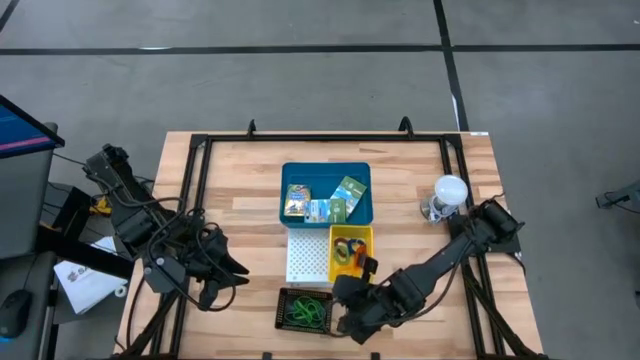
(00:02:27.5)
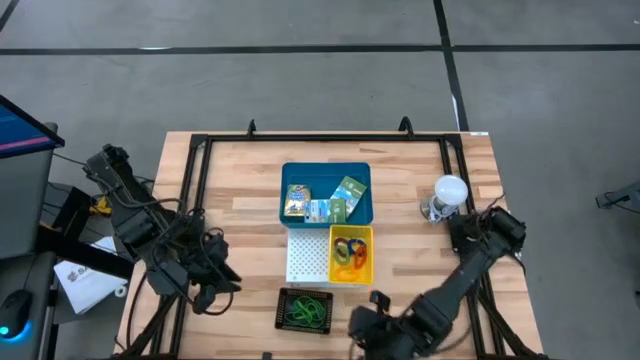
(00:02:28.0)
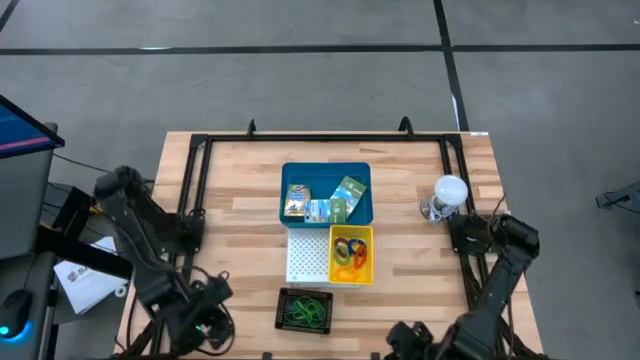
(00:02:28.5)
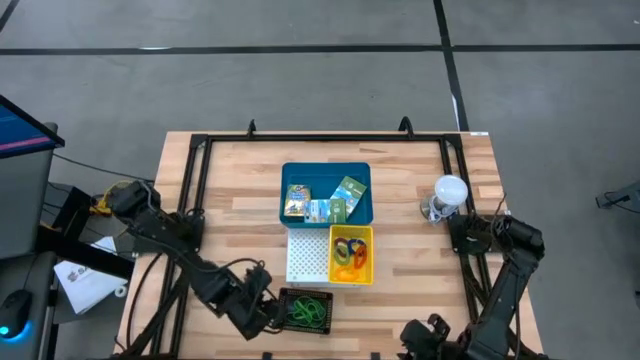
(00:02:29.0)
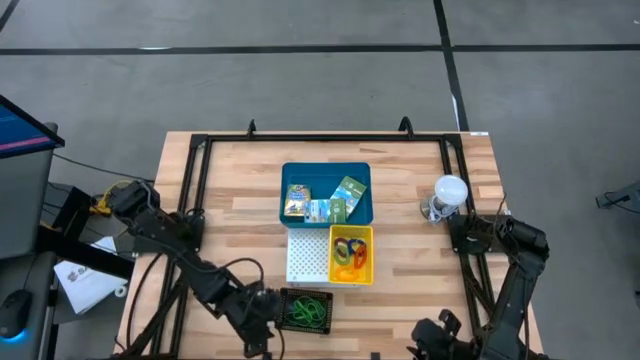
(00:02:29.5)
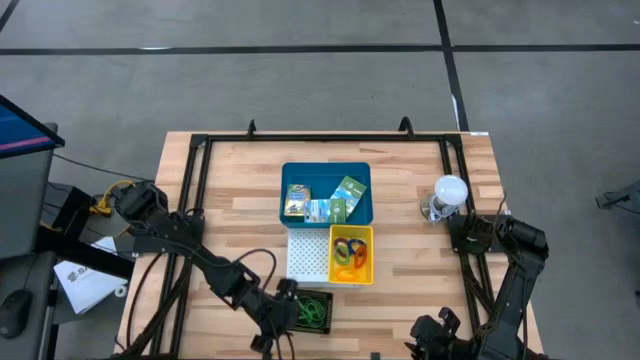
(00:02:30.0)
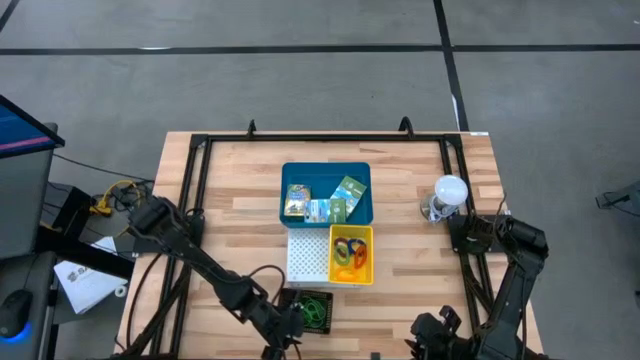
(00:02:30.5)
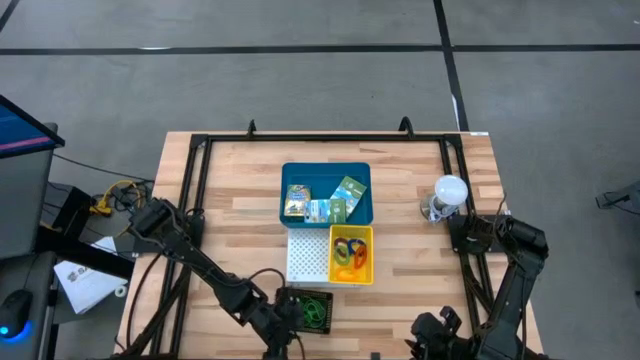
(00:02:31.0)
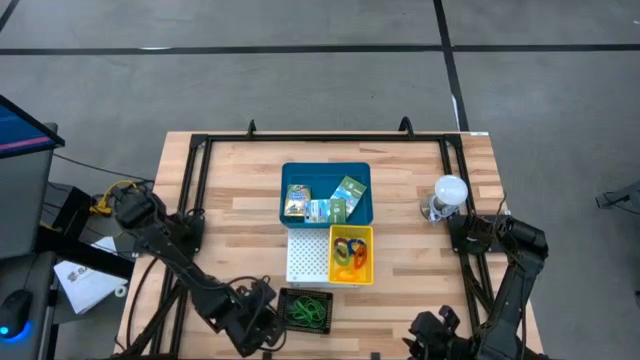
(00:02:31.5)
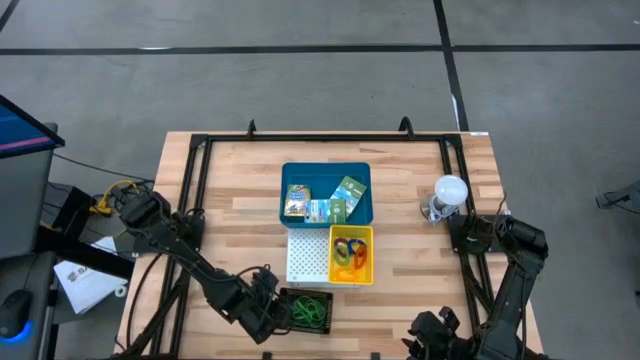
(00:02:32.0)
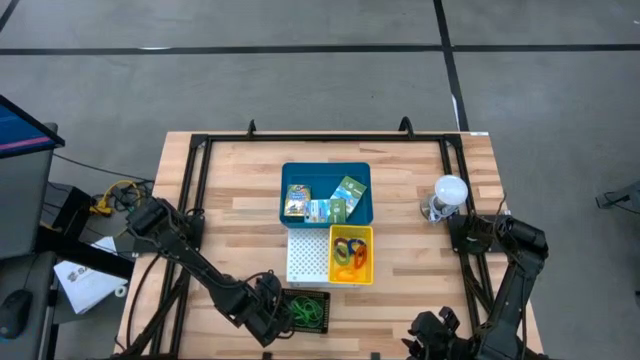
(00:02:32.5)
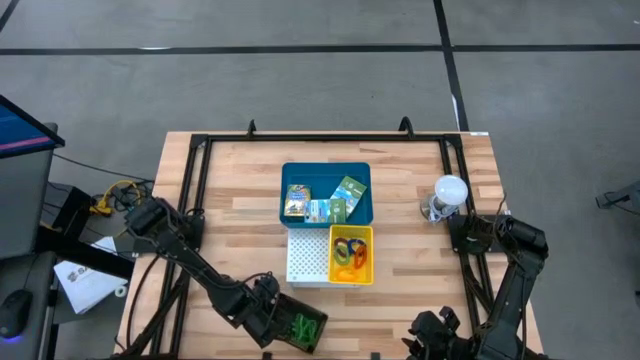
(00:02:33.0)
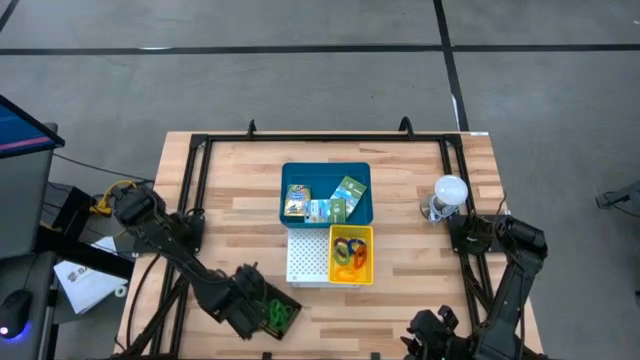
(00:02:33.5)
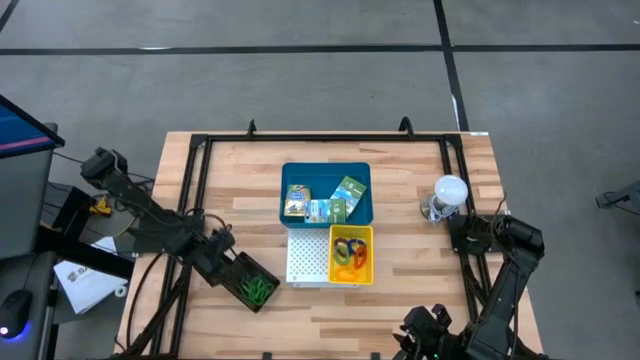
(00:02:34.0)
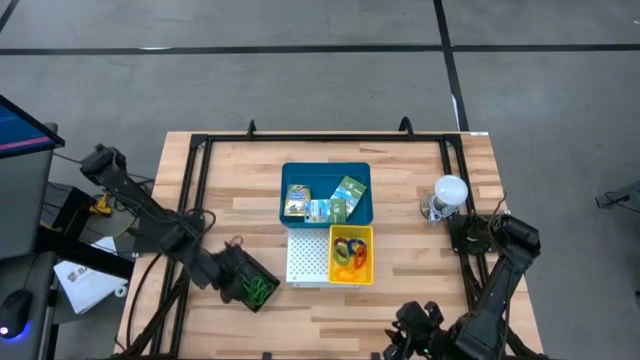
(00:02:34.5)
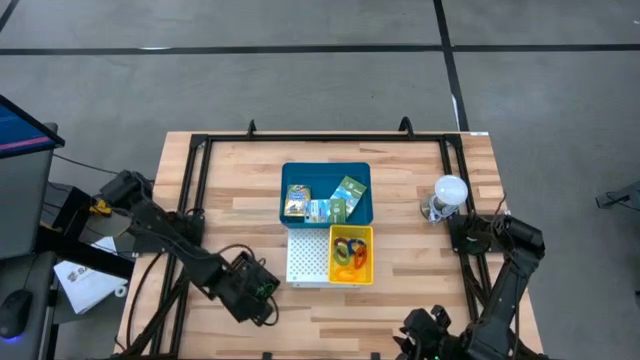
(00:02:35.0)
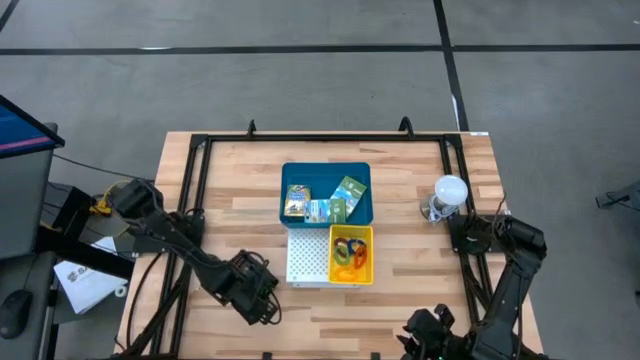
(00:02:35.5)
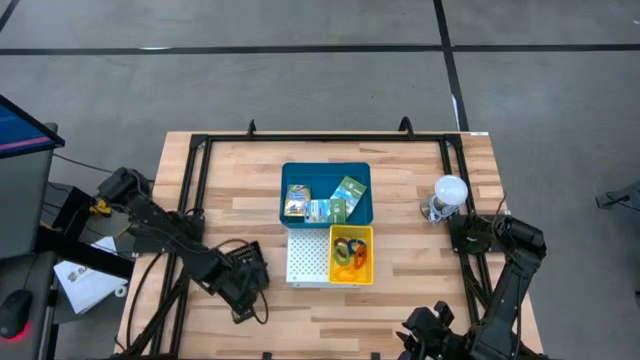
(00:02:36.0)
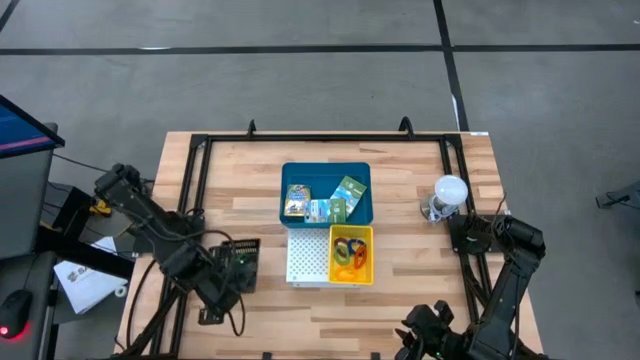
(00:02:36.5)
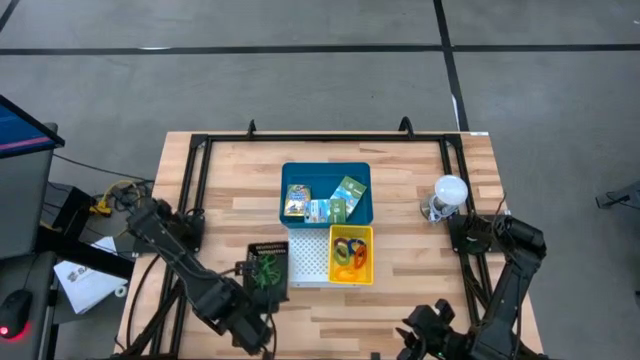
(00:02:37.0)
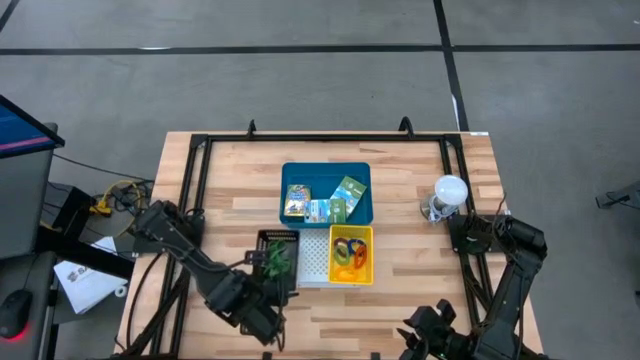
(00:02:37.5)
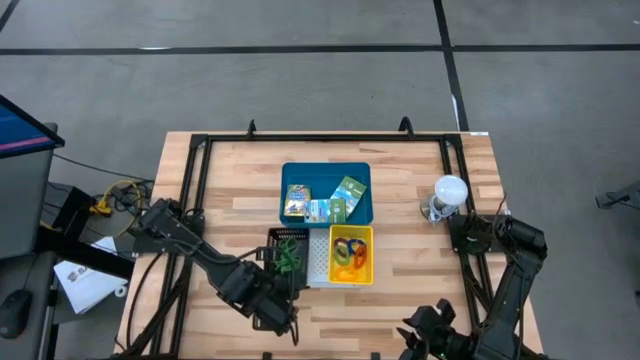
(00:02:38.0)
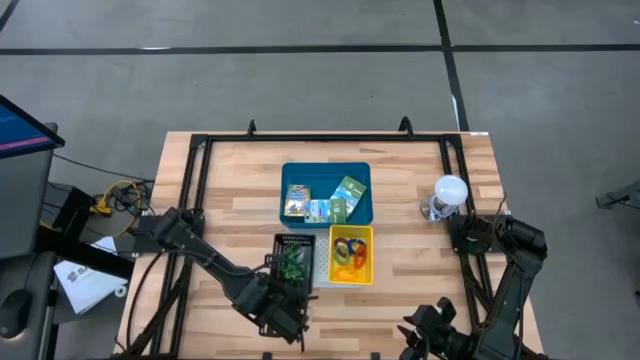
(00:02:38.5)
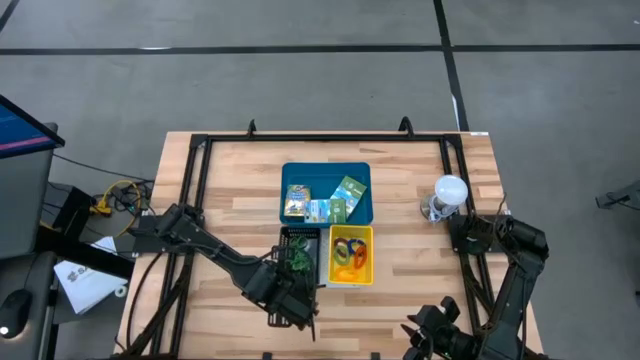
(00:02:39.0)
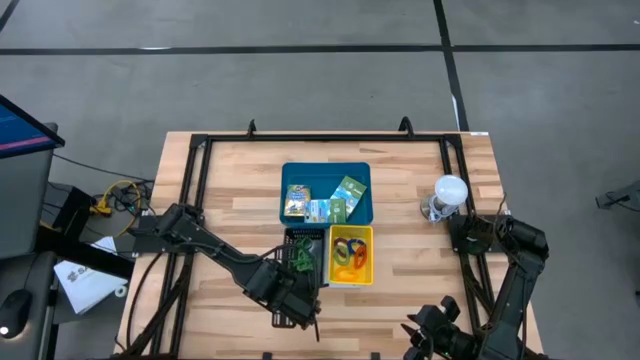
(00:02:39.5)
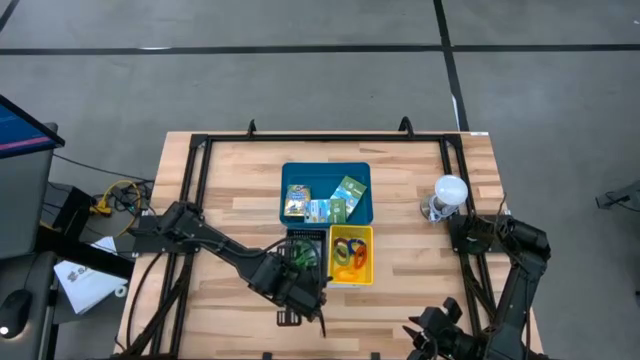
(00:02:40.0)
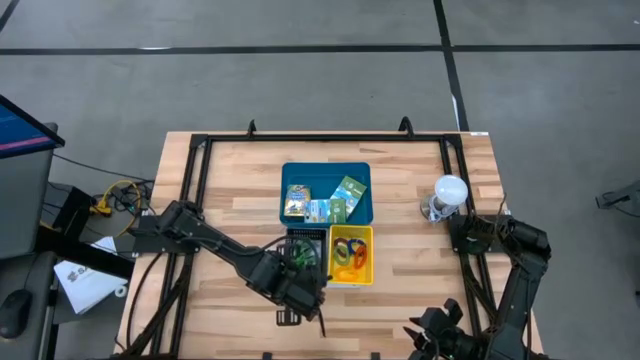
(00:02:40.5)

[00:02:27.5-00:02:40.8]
Task: Pick & Place Office Desk Supplies
Put the black bin on the shelf

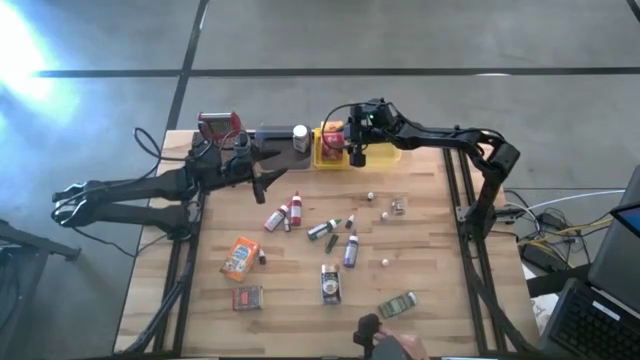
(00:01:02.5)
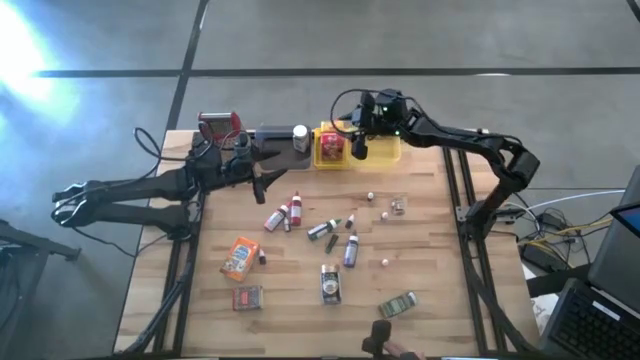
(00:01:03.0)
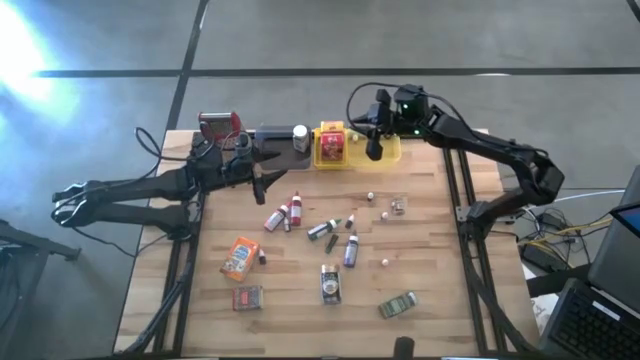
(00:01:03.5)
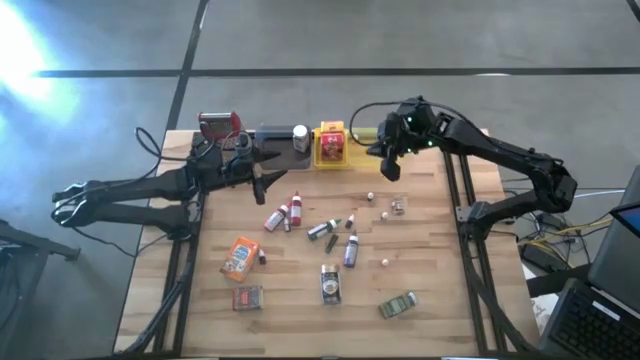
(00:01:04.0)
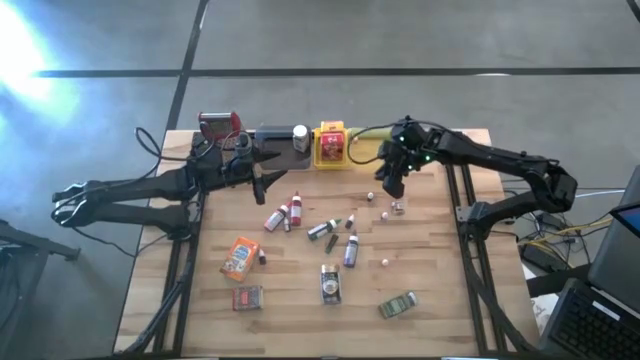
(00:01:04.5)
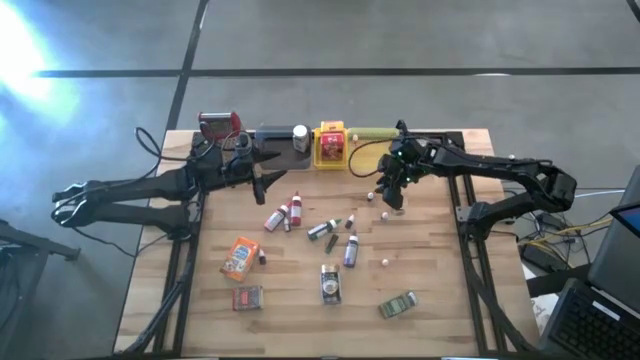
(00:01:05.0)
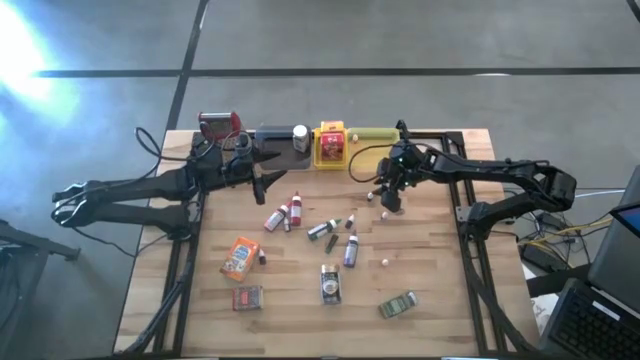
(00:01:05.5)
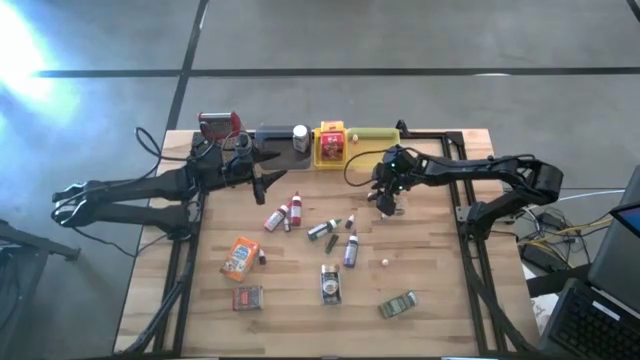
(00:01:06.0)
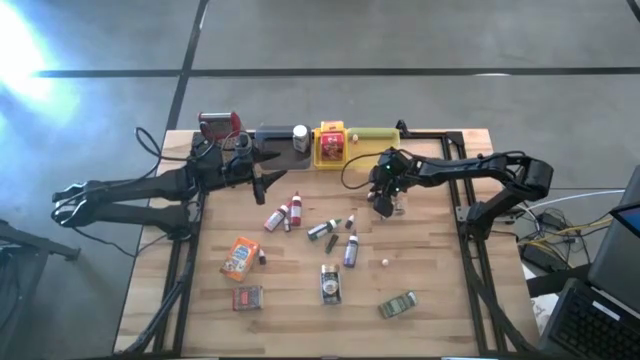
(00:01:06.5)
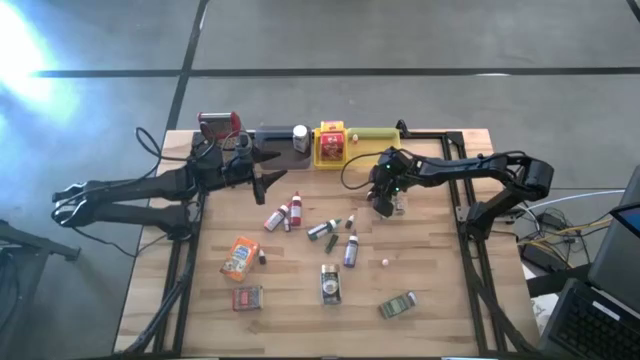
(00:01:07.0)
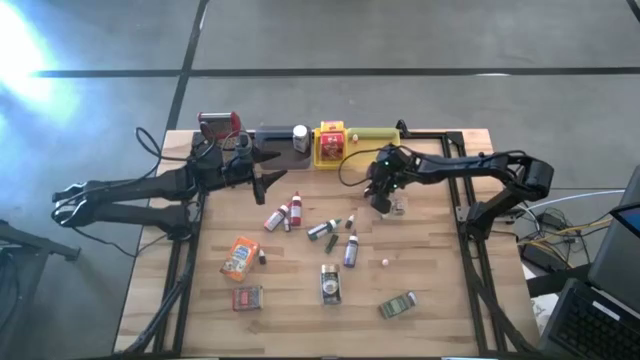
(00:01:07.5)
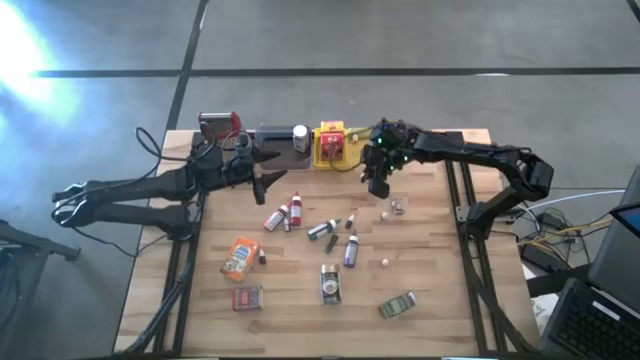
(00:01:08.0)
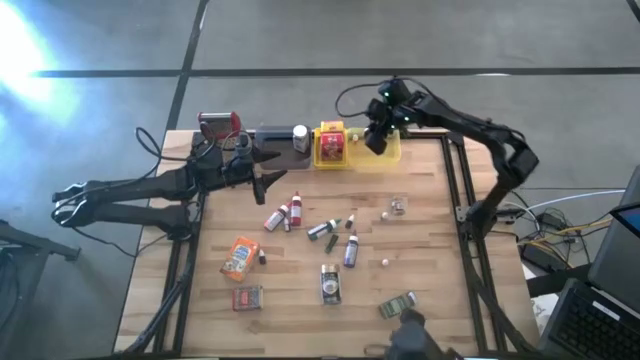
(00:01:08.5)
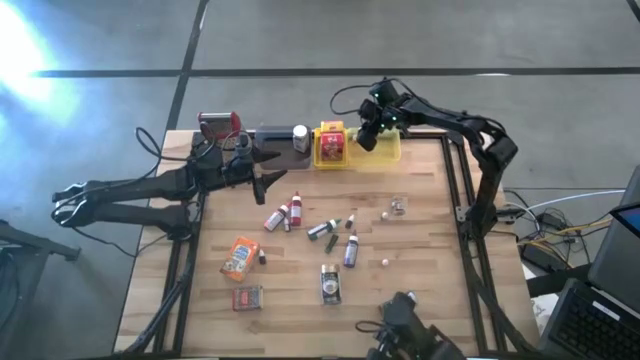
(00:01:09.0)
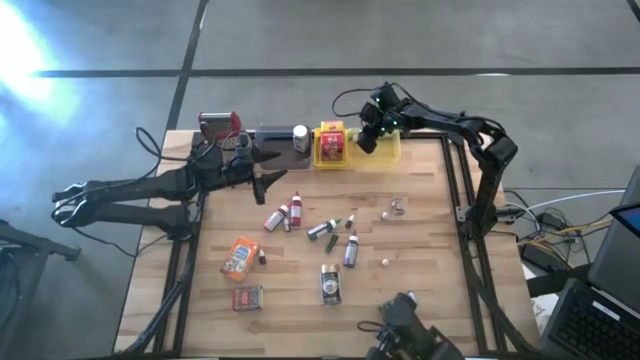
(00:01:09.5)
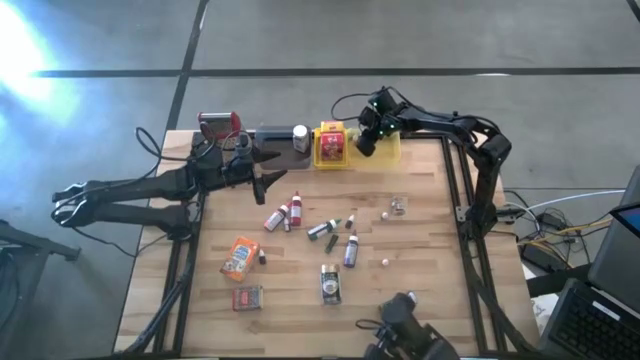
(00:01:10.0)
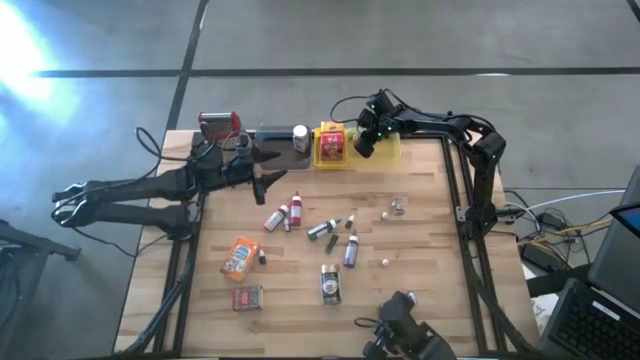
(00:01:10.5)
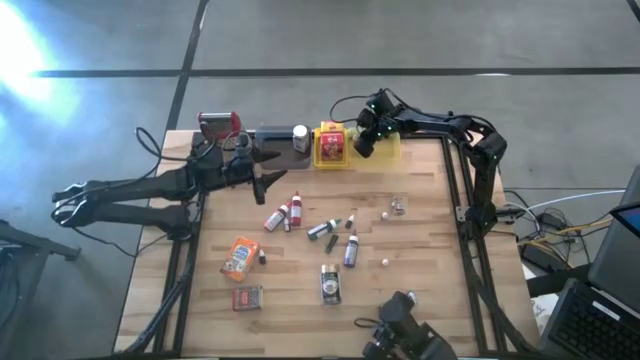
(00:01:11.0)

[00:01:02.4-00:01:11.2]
Task: Pick & Place Kitchen Items
Put the black food coloring bottle into the light yellow bin
